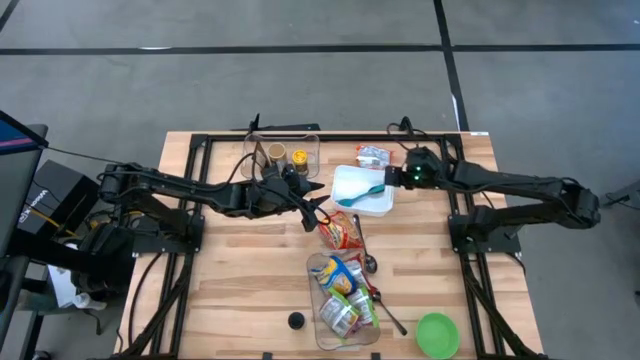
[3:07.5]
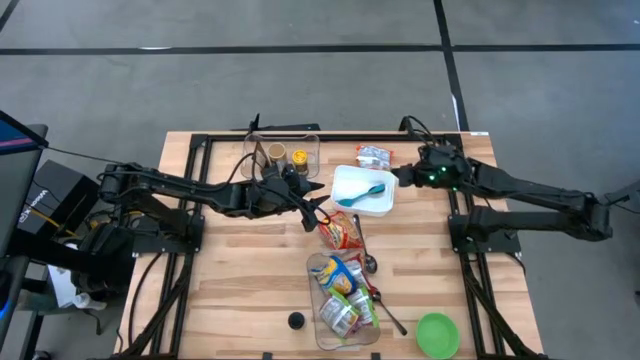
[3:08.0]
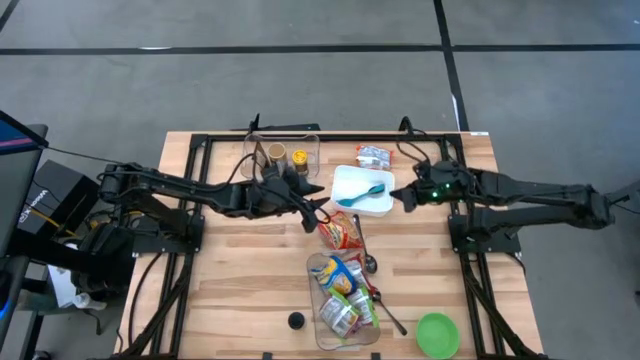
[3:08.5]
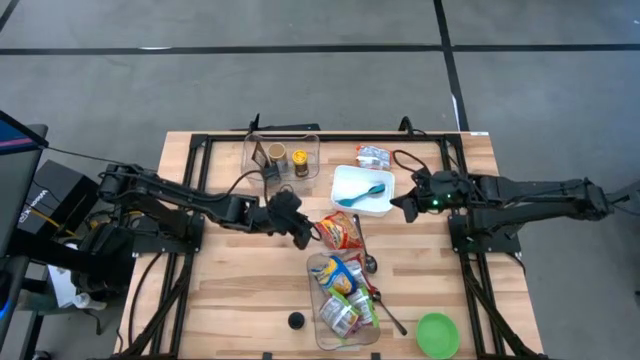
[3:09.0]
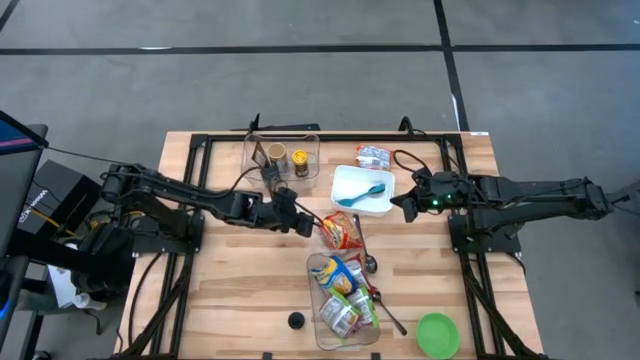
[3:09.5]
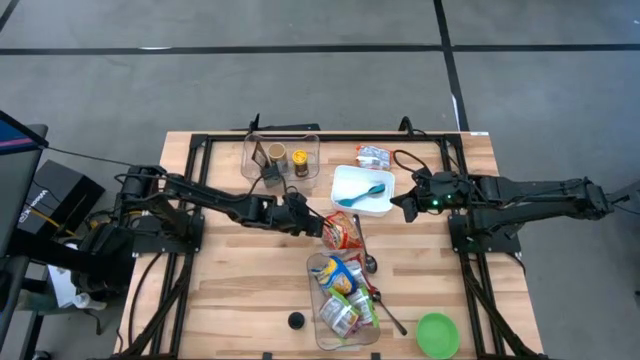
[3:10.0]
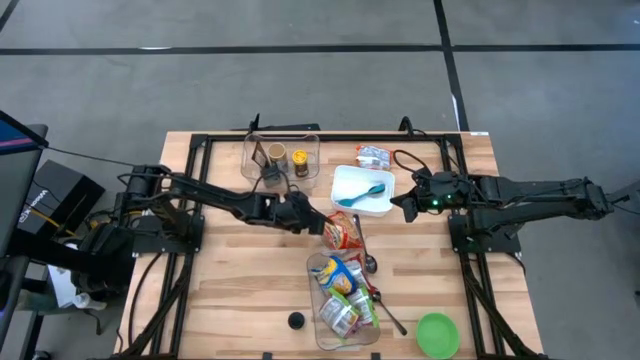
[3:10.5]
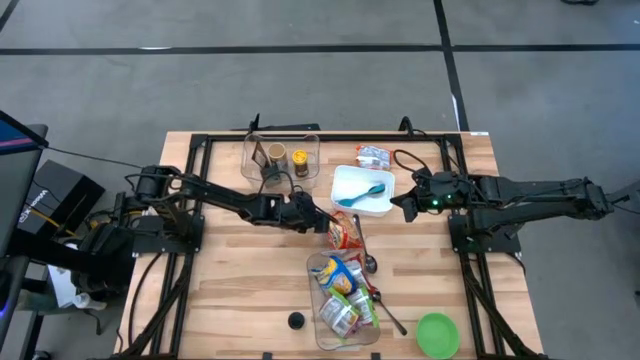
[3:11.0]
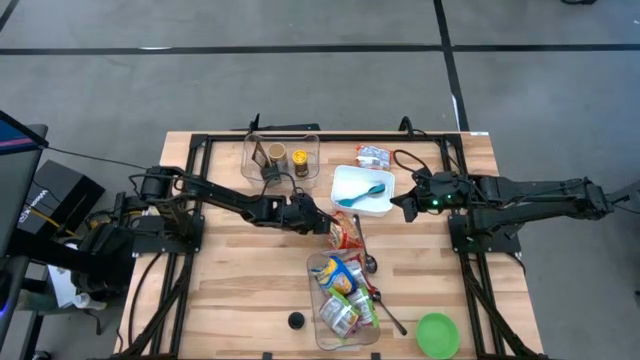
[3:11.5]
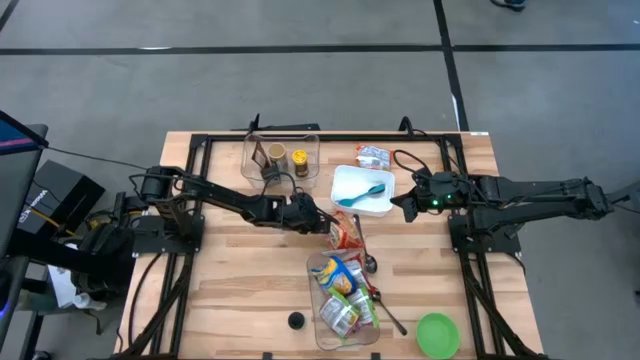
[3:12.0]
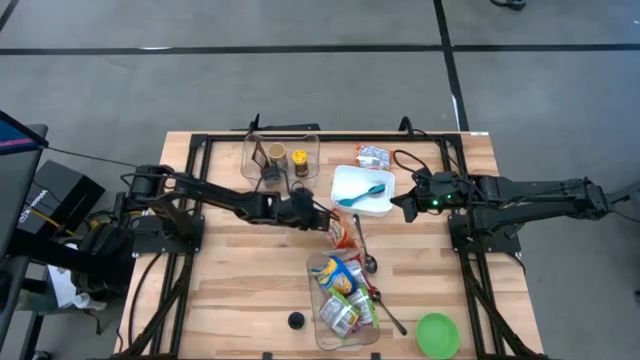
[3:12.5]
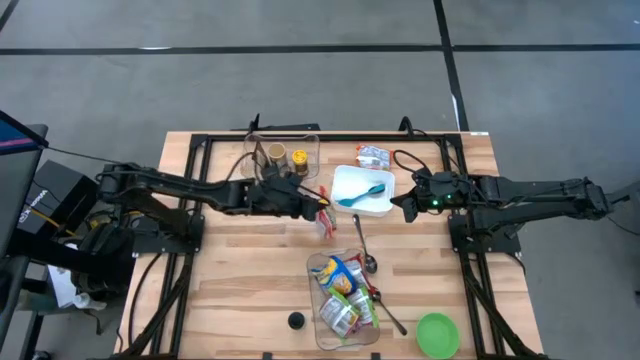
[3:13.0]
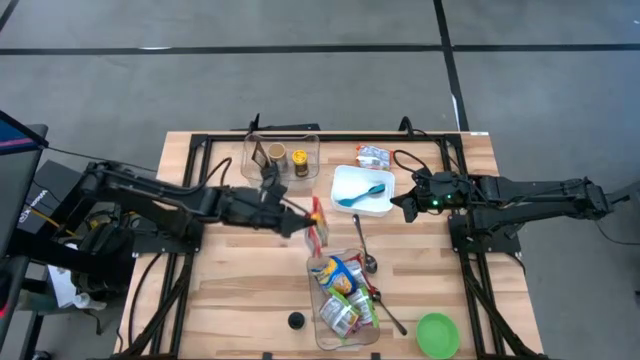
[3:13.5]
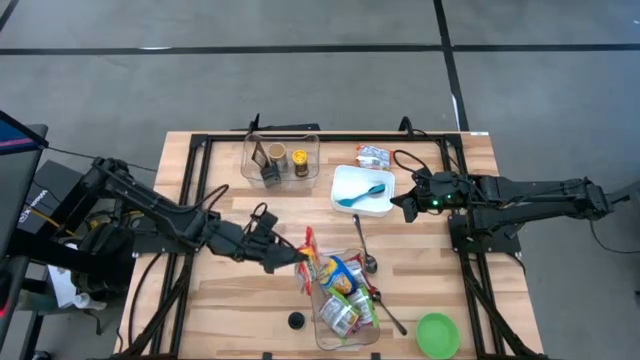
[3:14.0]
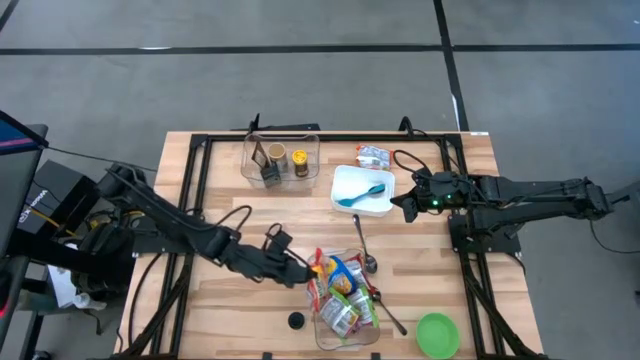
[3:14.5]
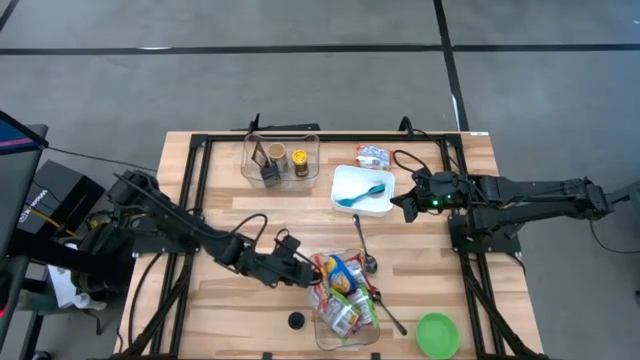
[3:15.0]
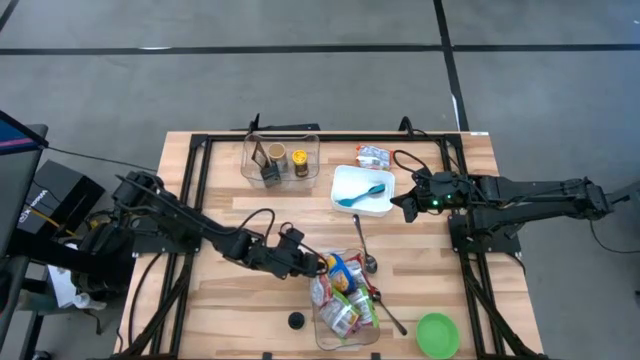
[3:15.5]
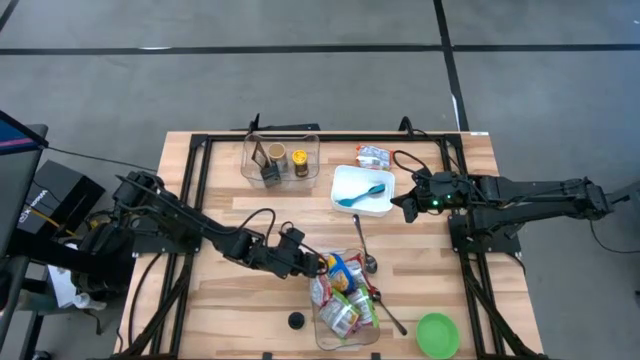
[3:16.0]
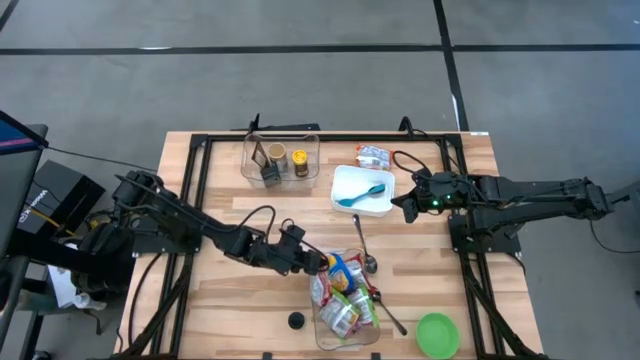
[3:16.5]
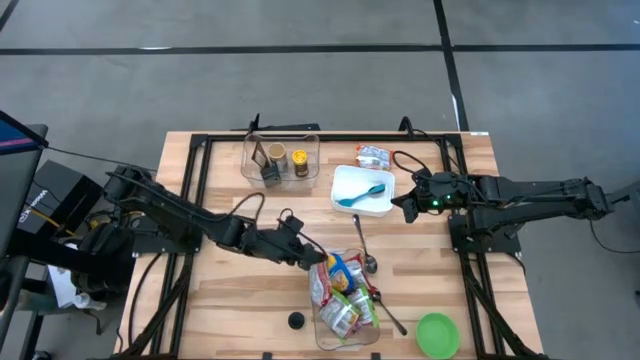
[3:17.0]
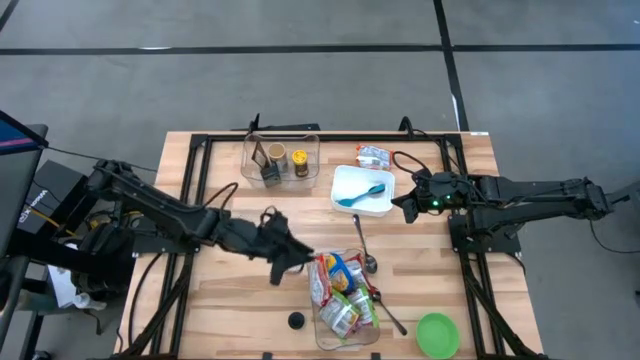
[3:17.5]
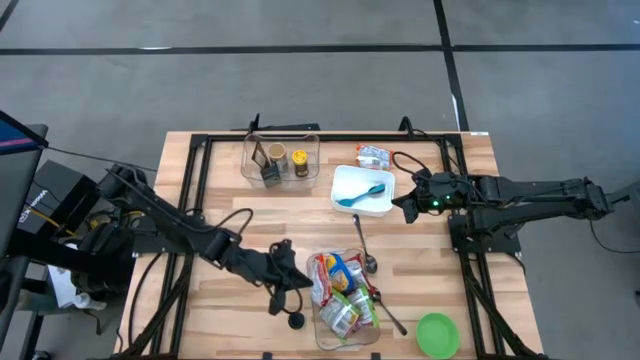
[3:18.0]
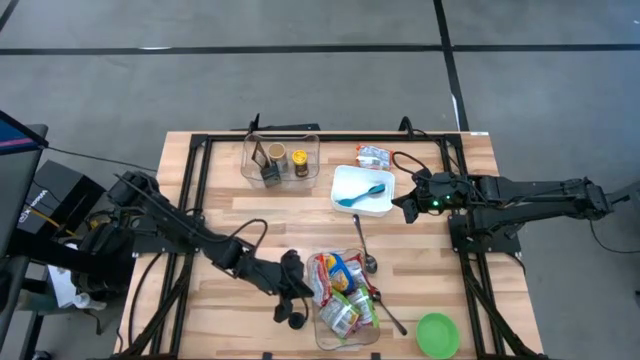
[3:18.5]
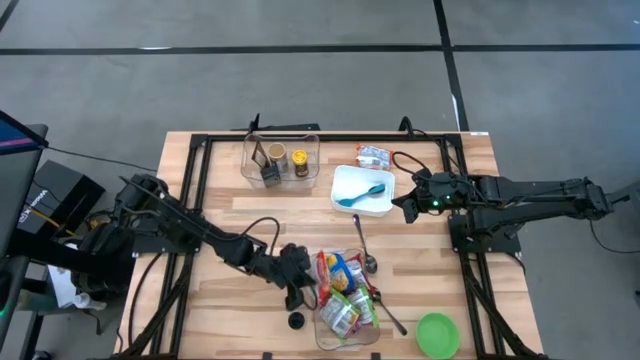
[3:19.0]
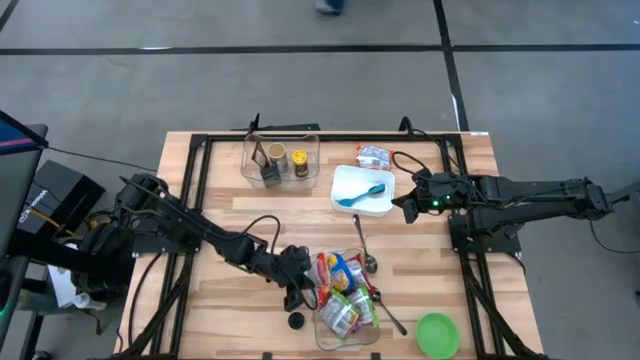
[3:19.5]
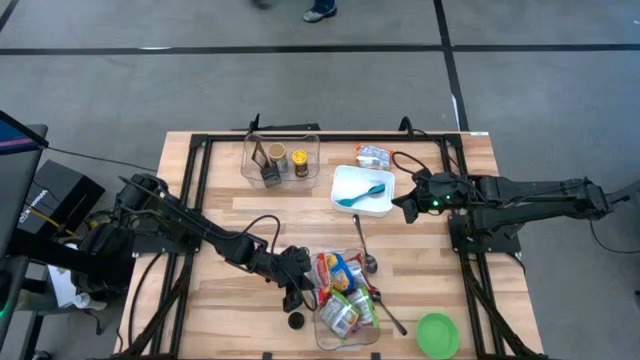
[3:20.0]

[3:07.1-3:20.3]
Task: Pick & Place Food Item
Put the dark orange noodle pack into the bottom transparent bin

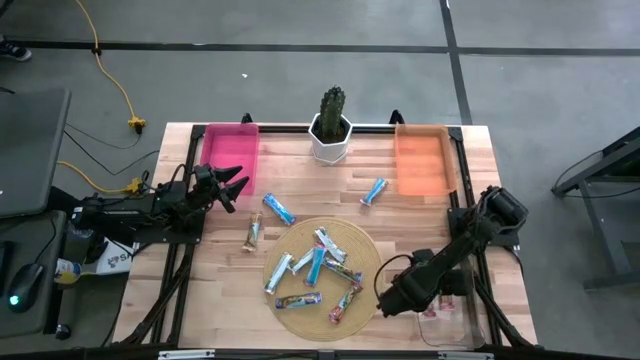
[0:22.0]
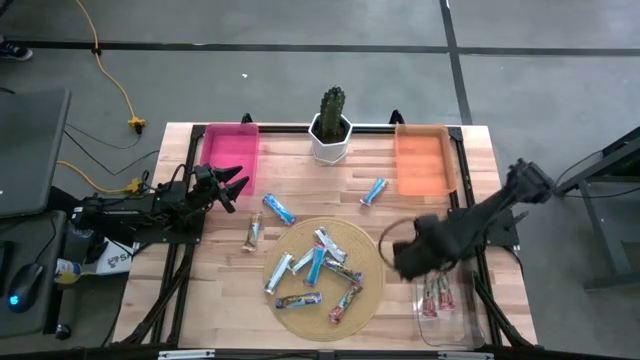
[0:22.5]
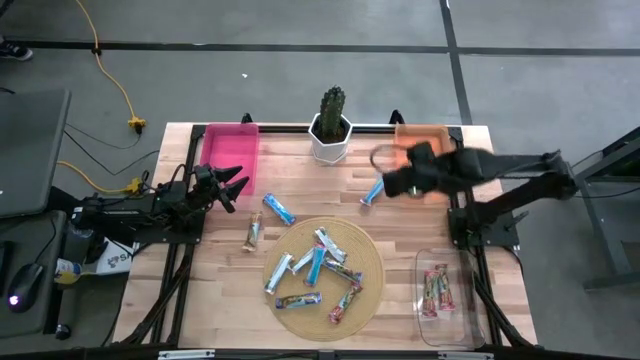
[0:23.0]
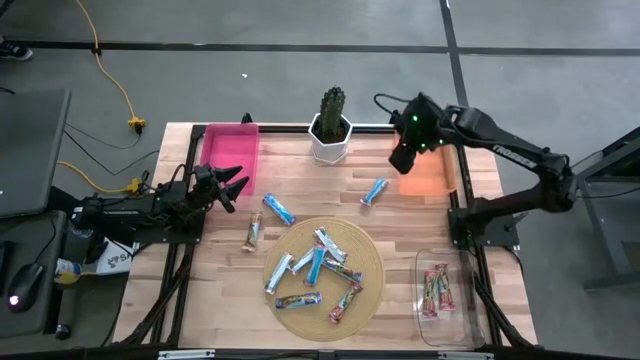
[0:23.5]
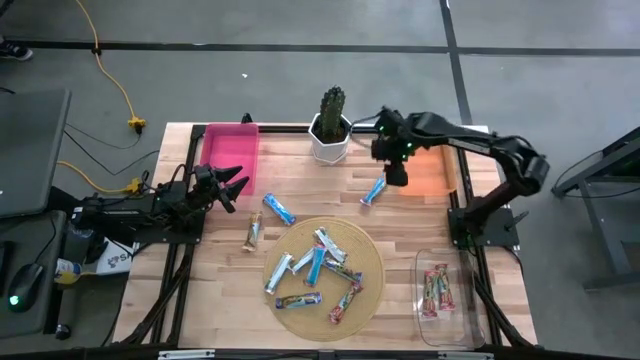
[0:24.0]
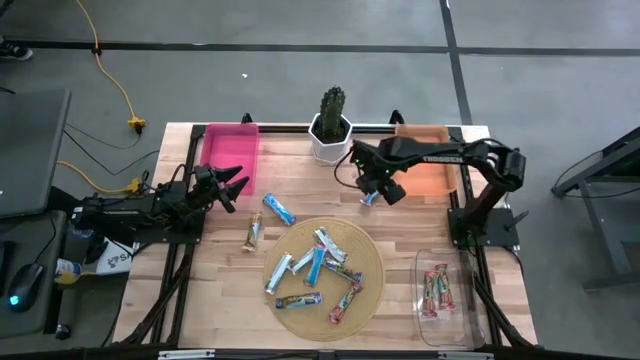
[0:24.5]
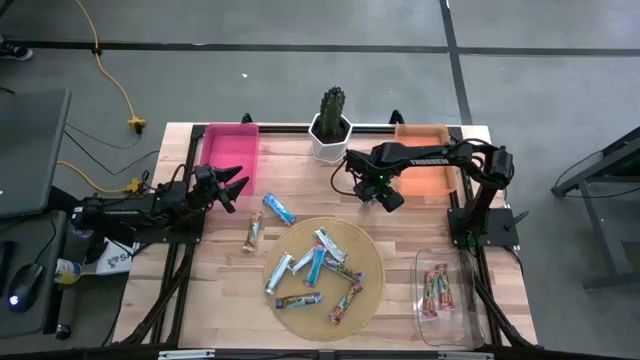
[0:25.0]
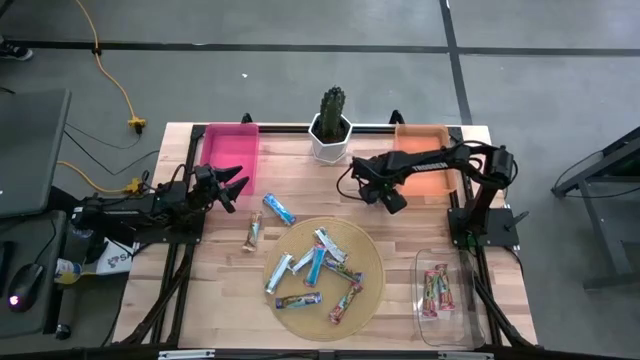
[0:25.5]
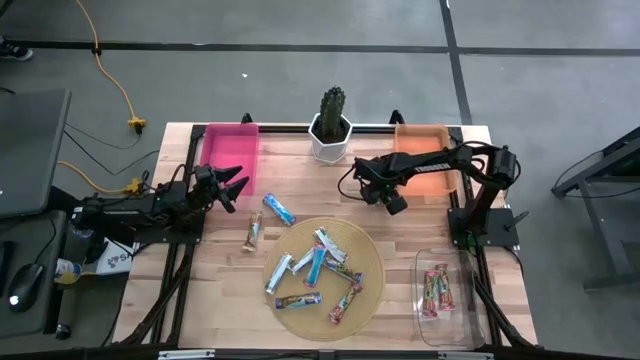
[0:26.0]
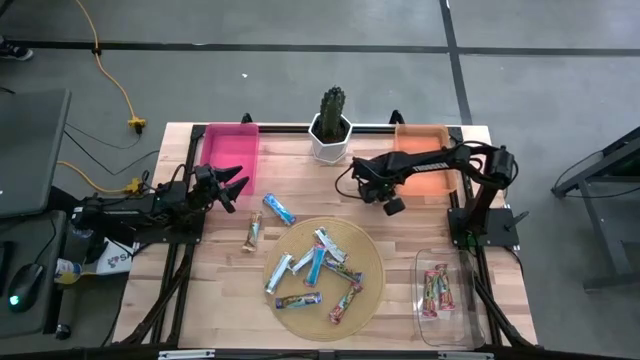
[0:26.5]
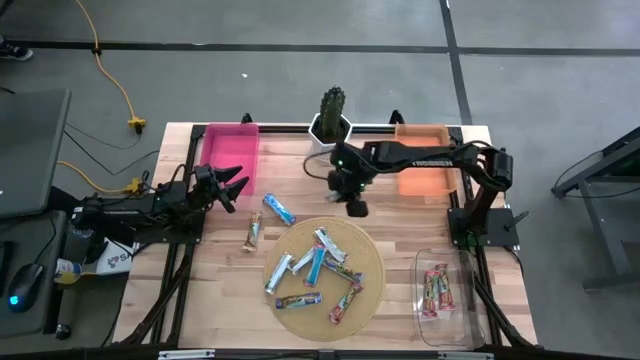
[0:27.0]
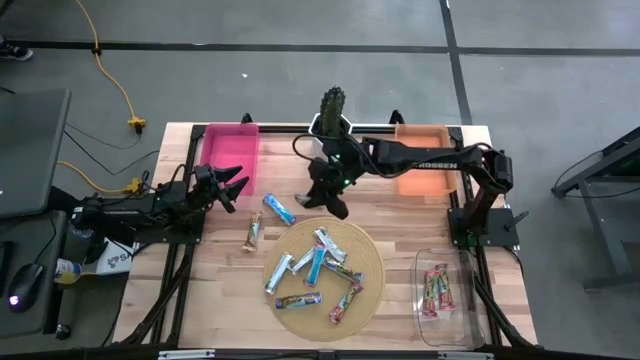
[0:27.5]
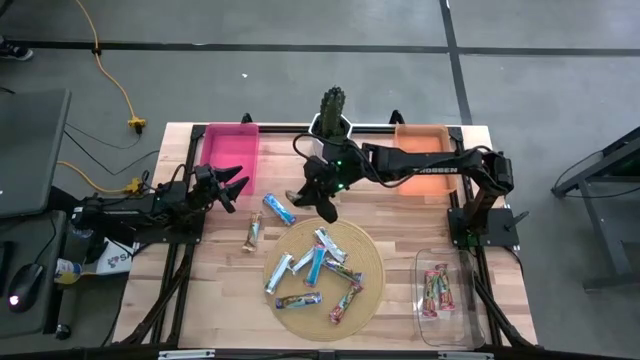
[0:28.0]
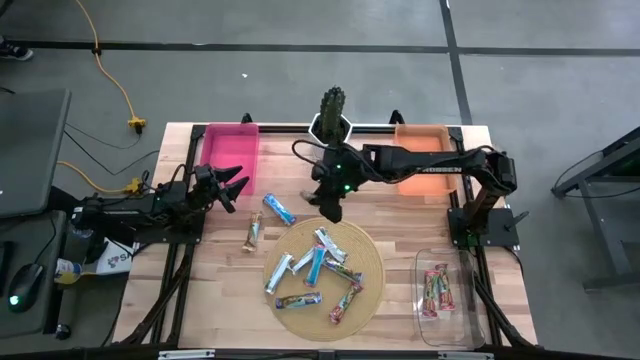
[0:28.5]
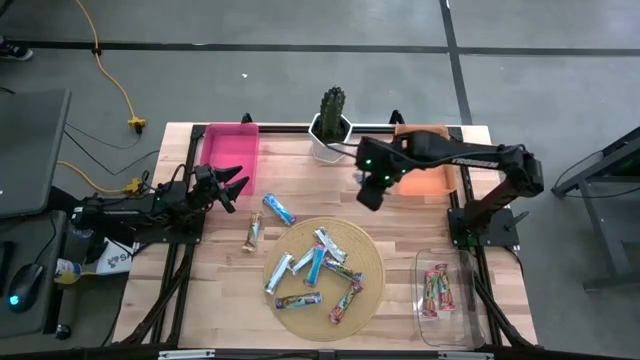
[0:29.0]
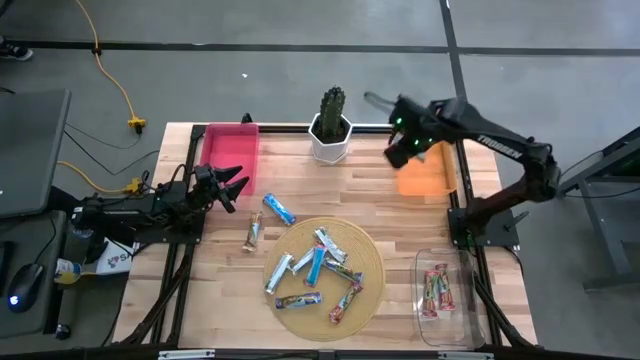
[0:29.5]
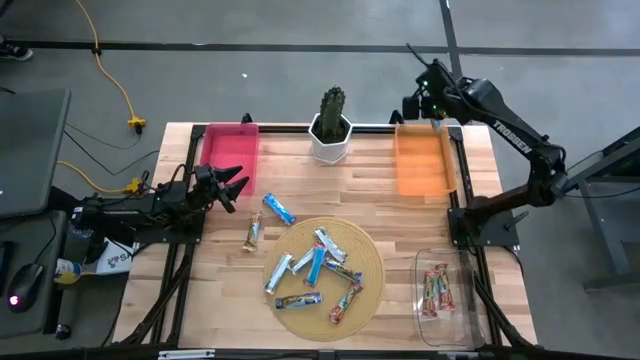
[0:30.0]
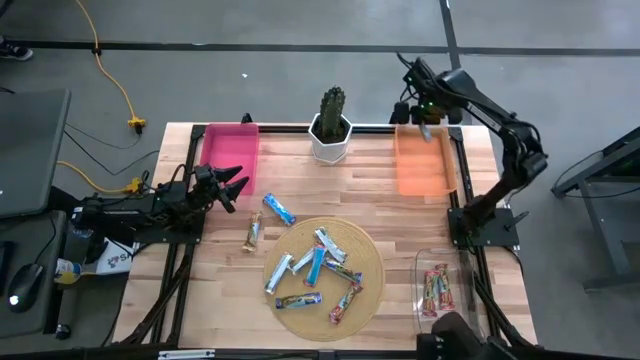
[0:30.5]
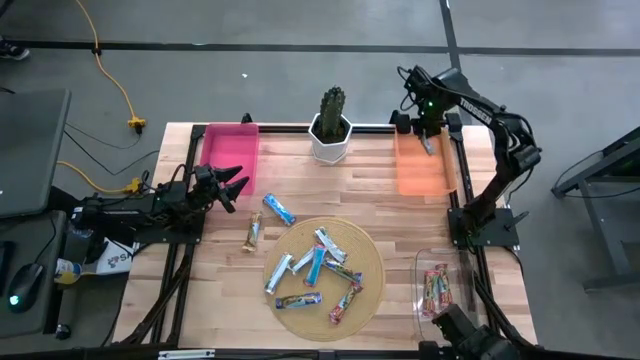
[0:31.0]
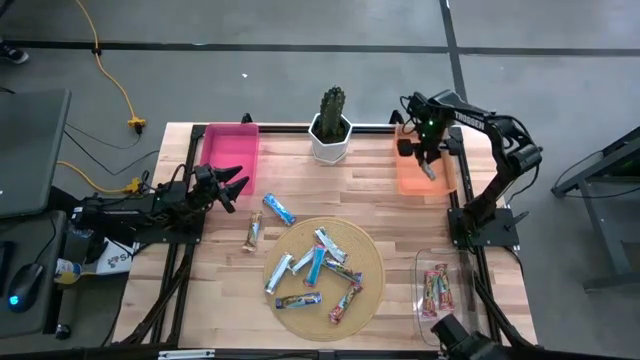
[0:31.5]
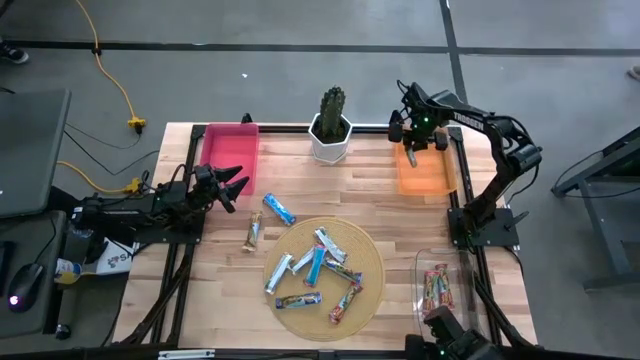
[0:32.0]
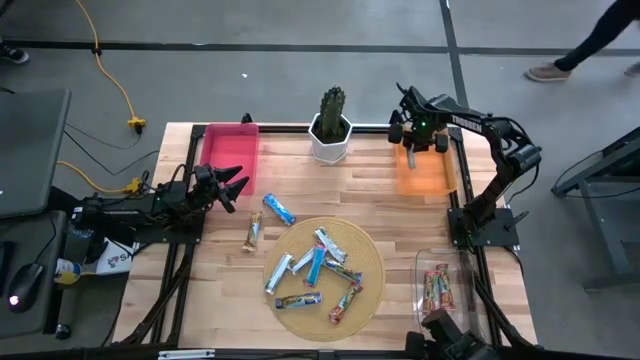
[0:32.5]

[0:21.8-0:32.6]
Task: Pick and place Granola Bars by type
Put the yellow granola bar into the orange bin
